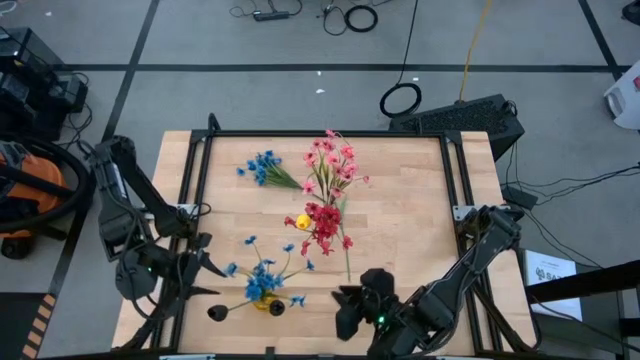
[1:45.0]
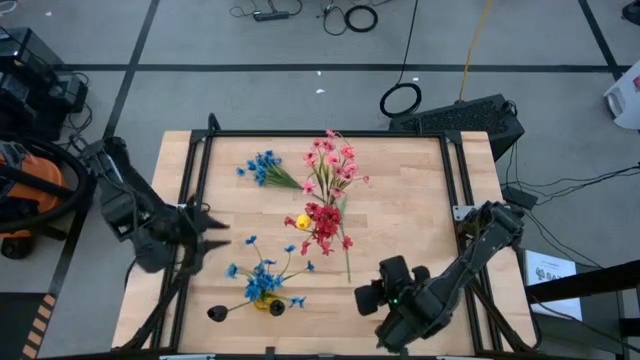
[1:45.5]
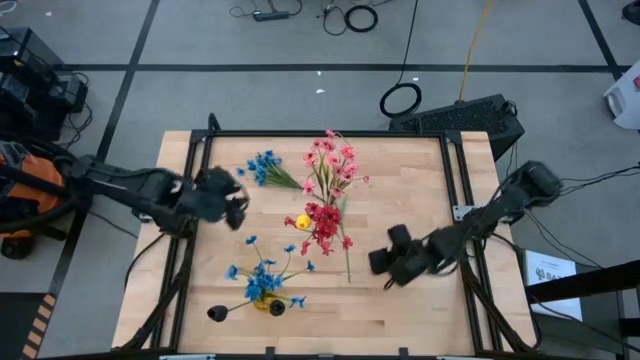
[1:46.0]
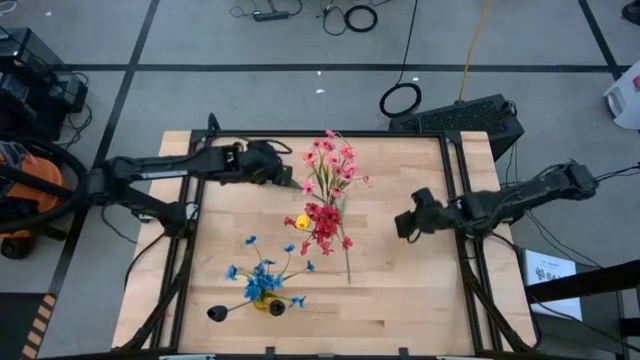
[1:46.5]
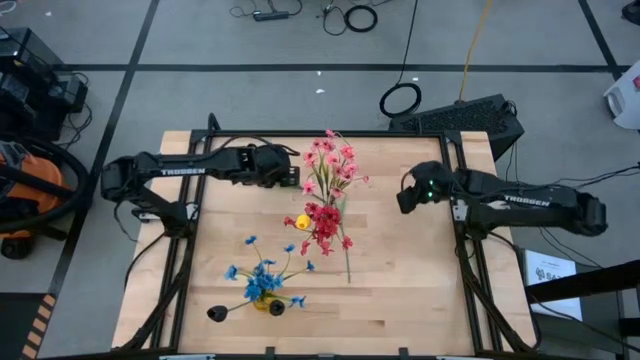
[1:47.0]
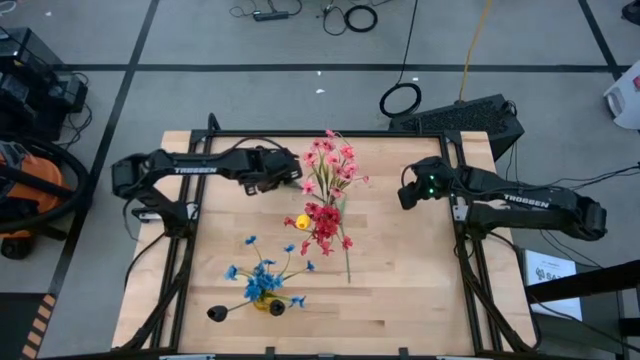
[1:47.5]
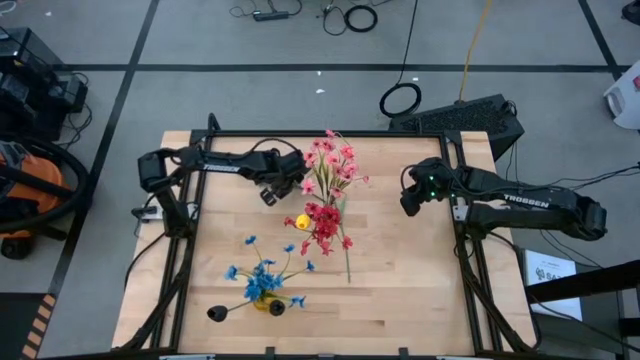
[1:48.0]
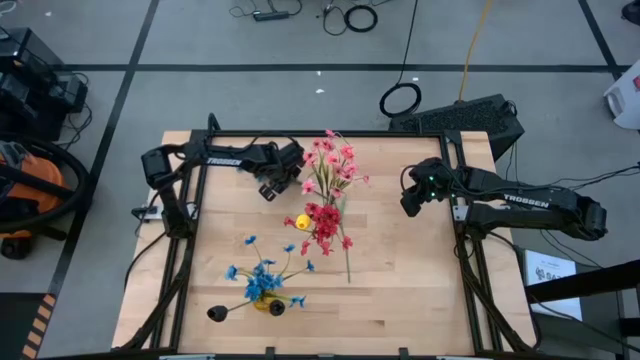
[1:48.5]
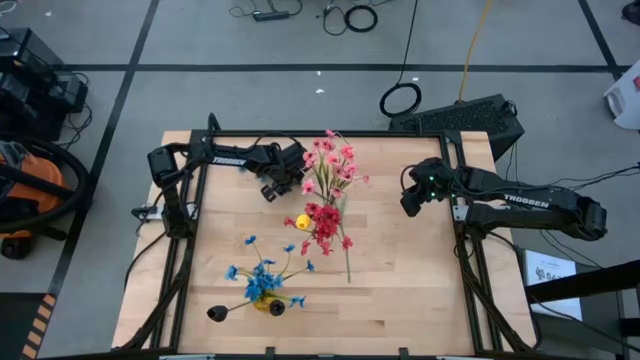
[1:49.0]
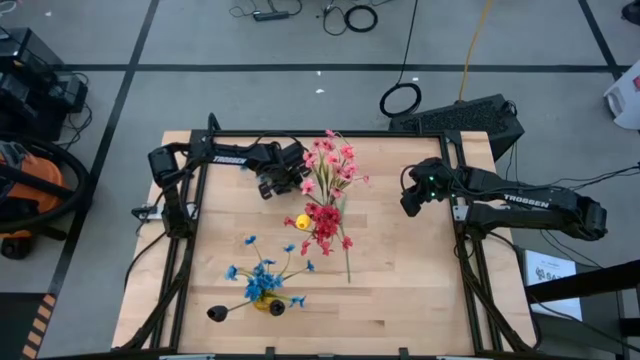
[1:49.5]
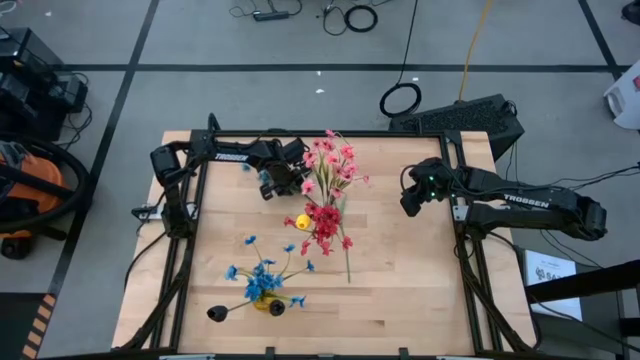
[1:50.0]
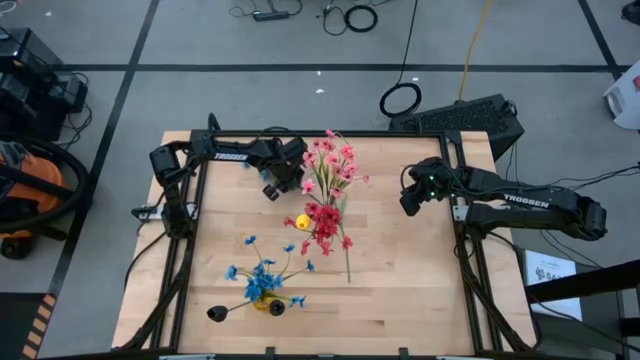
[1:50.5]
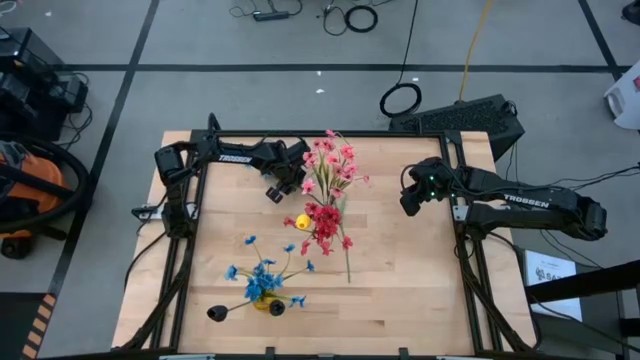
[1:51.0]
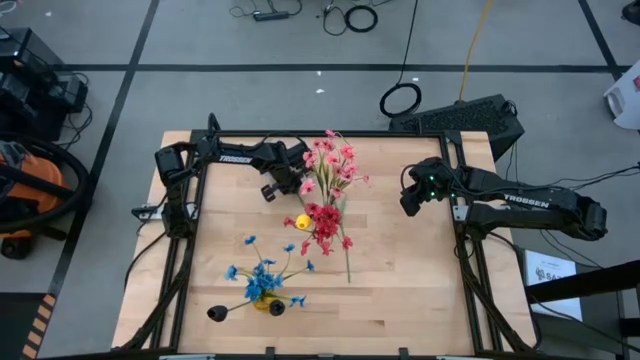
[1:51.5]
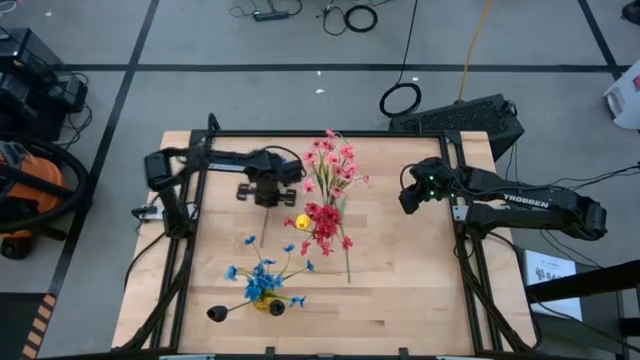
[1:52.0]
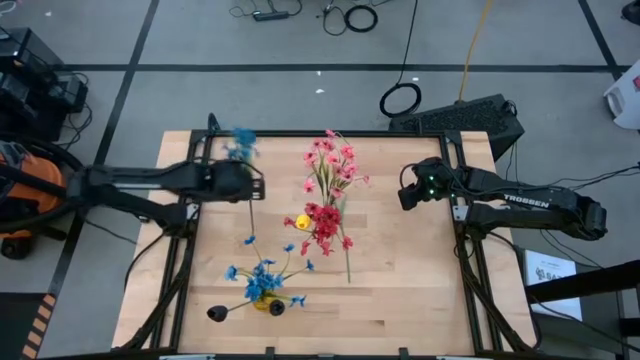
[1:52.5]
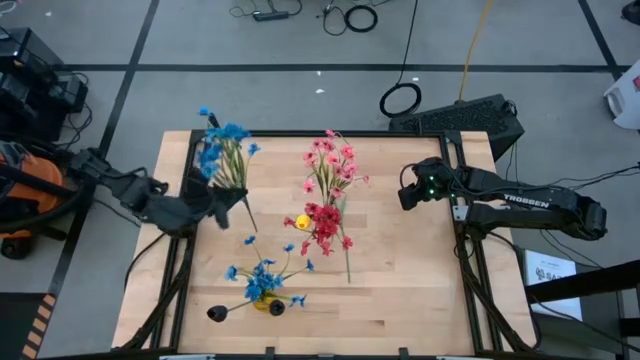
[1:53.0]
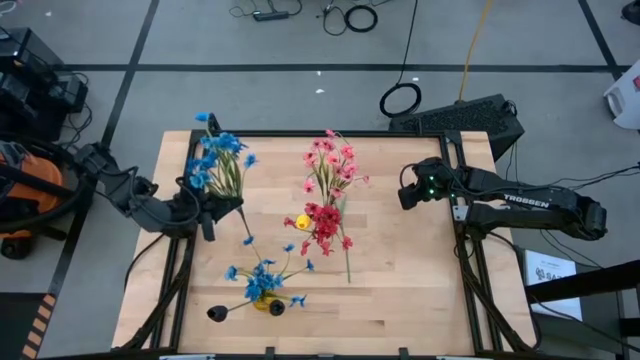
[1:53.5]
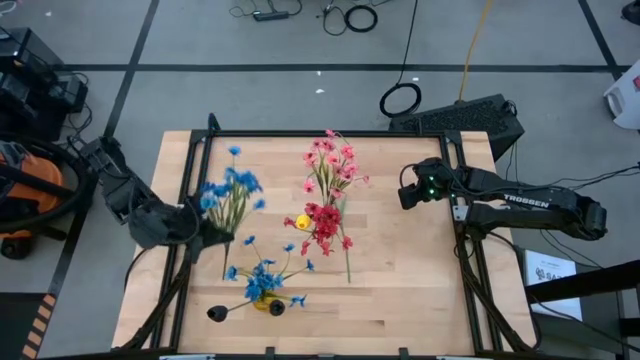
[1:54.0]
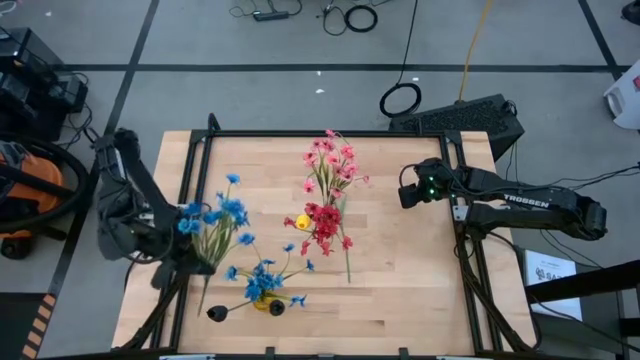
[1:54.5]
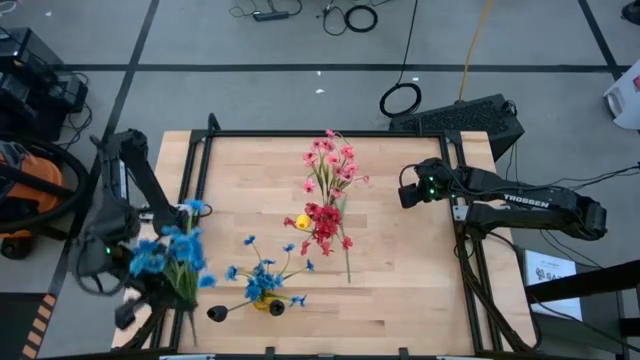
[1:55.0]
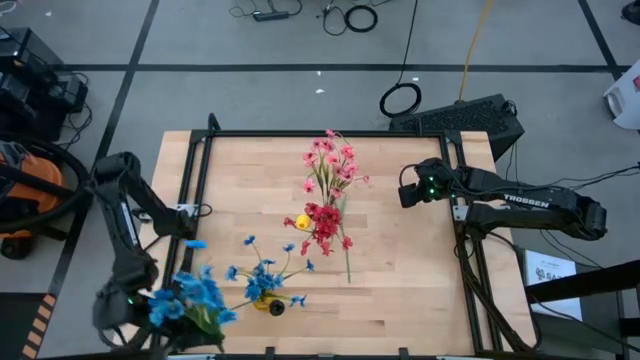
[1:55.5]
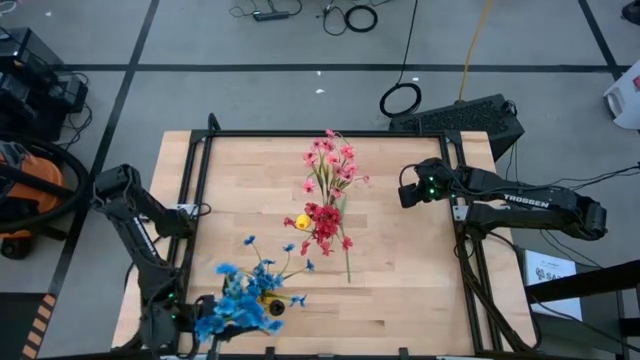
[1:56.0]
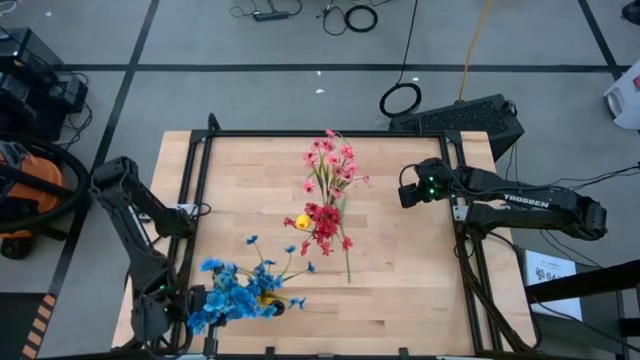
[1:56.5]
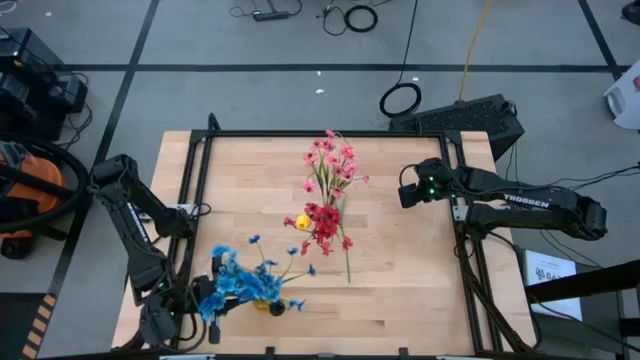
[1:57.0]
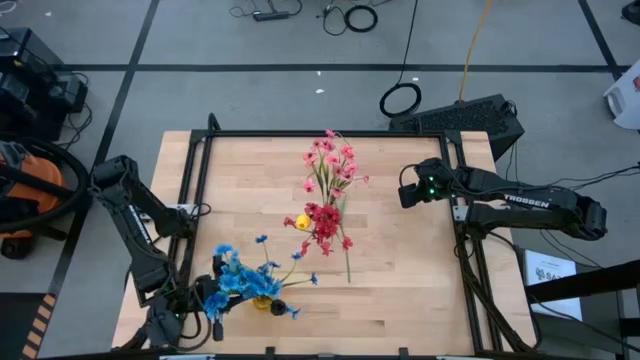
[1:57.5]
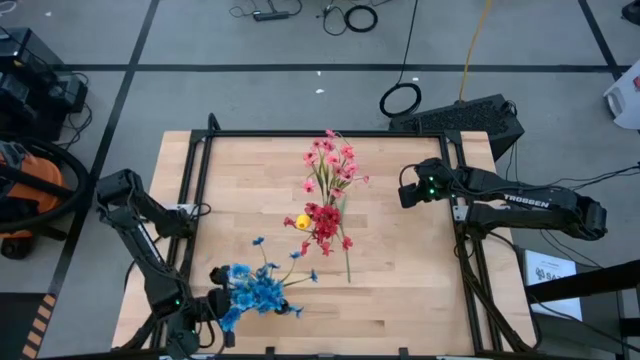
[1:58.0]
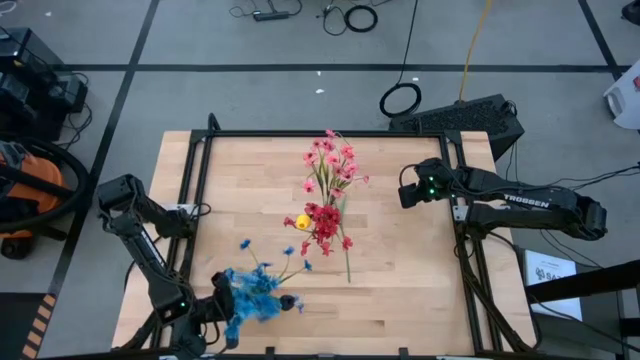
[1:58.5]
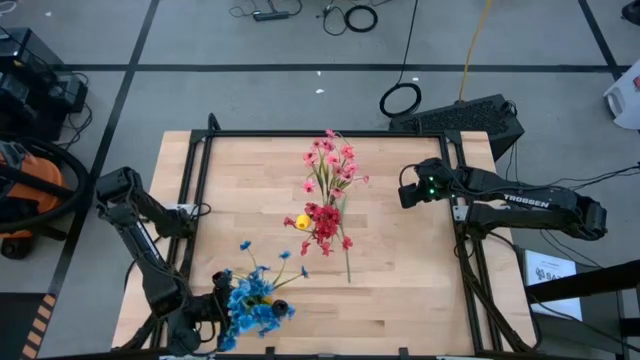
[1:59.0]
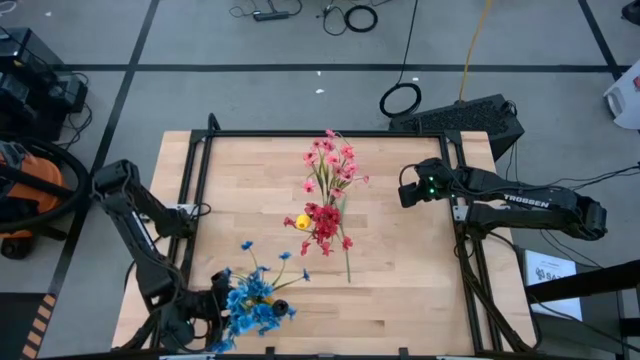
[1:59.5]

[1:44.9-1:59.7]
Task: Sort flowers into vase by color
Put the blue flowers into the yellow vase

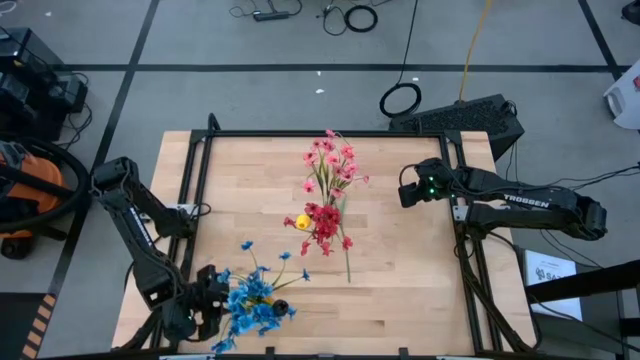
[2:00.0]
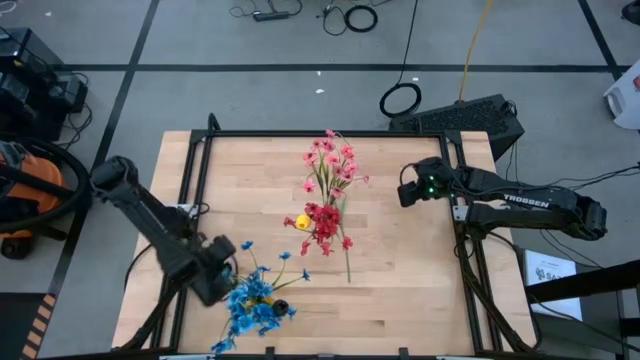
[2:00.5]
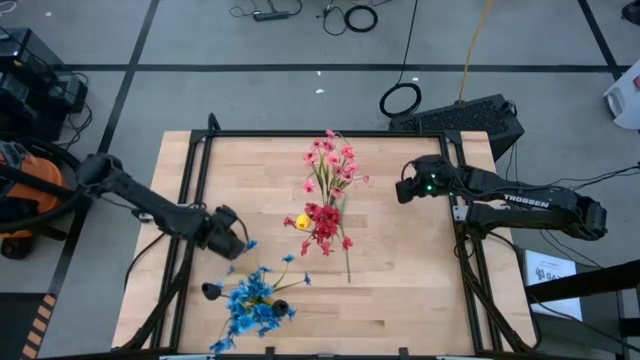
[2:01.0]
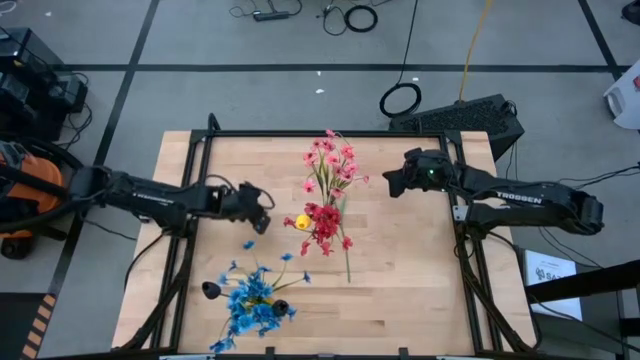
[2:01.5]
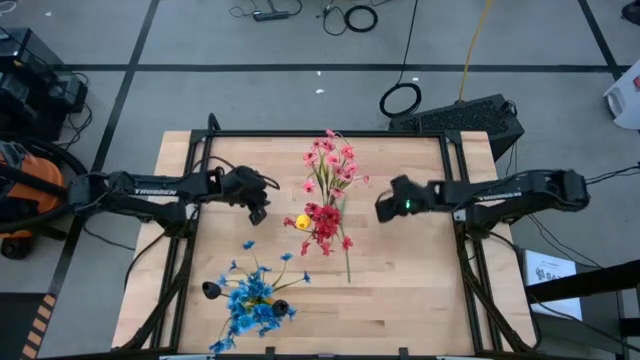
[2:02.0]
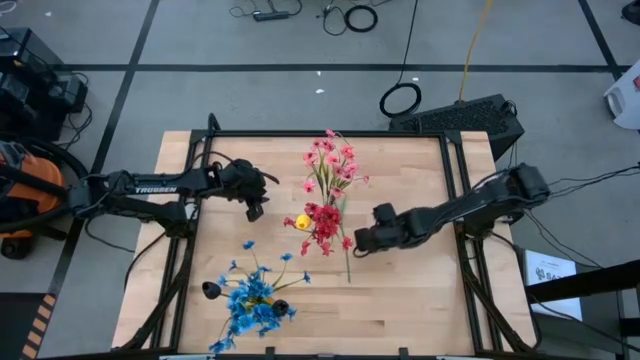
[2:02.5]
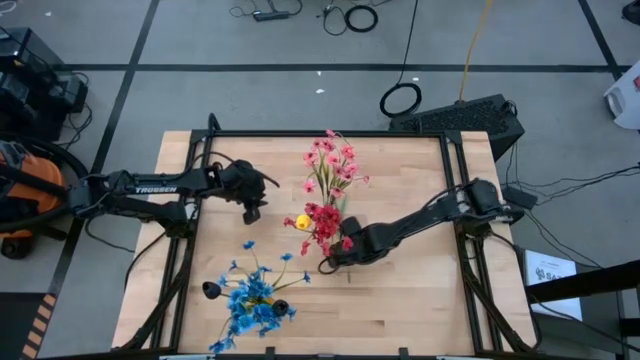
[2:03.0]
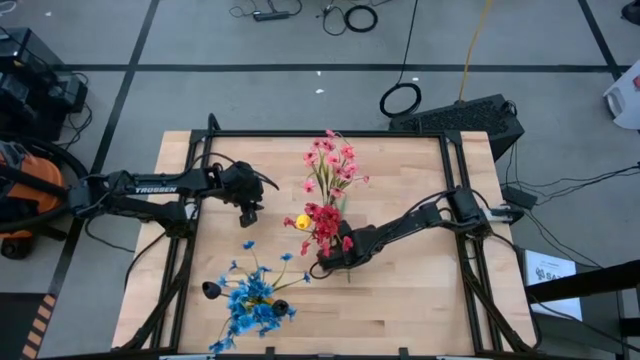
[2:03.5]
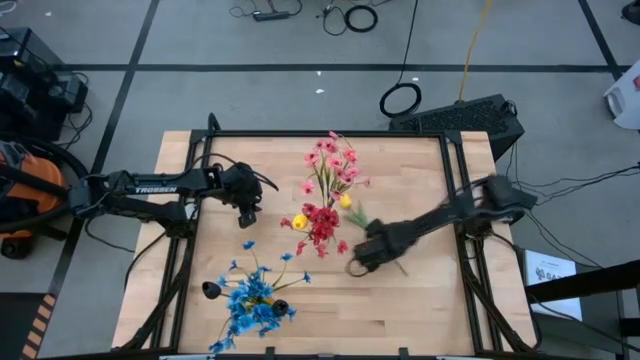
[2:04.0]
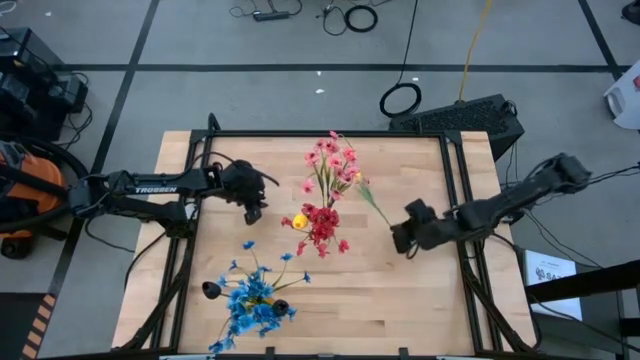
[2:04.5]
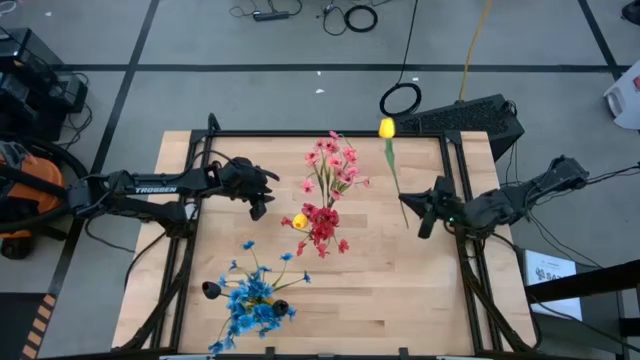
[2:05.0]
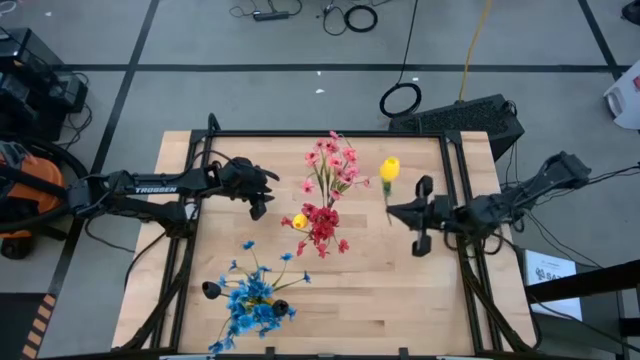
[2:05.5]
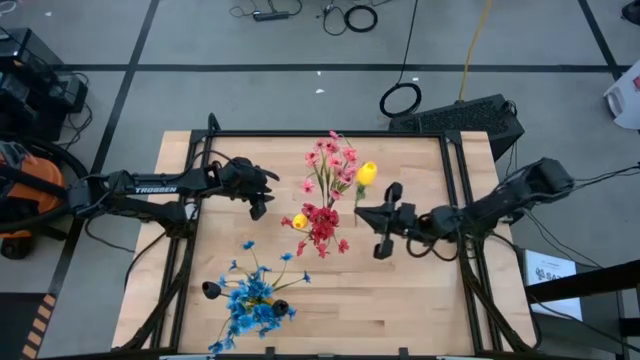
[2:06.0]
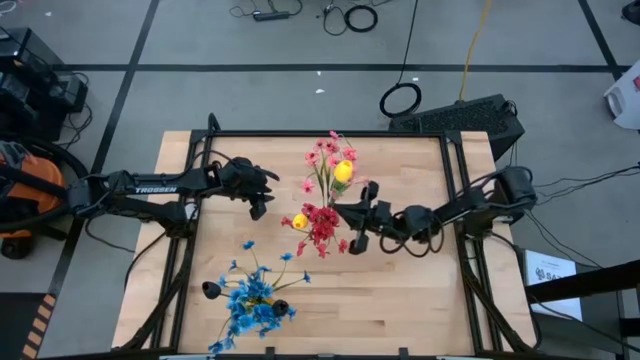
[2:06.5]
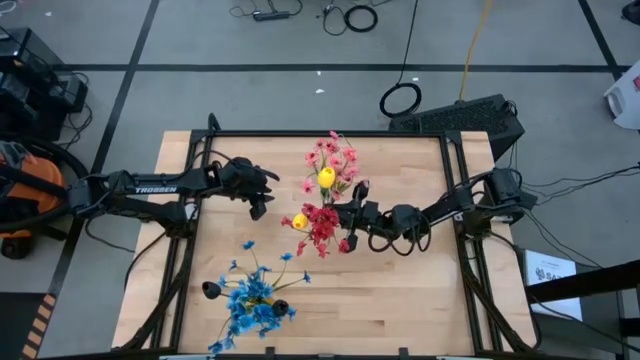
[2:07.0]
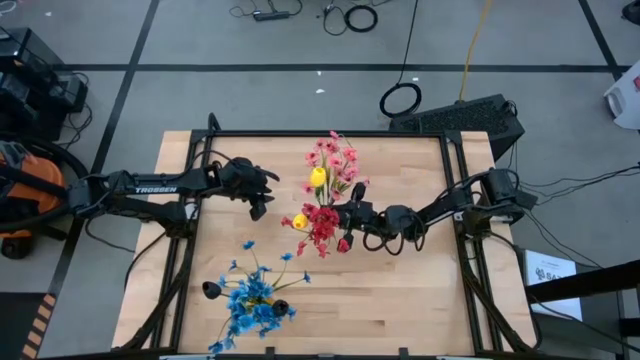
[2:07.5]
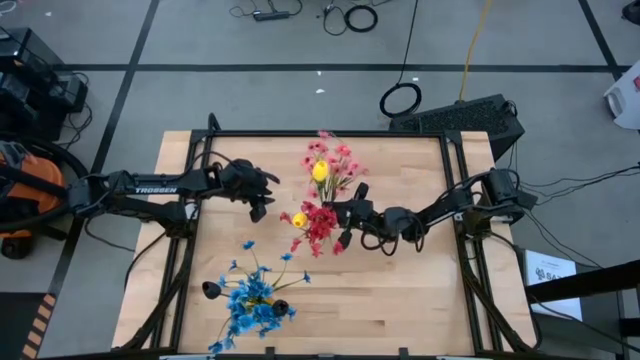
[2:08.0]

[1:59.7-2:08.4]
Put the yellow tulip into the transparent vase
